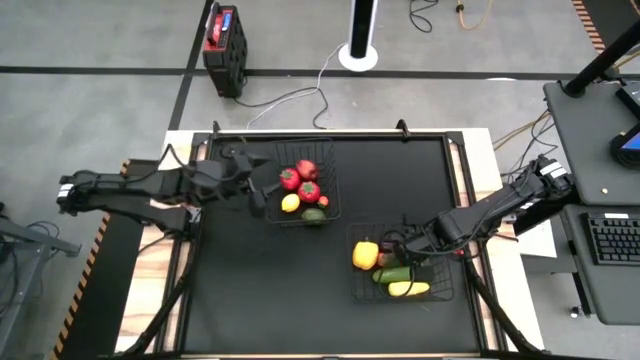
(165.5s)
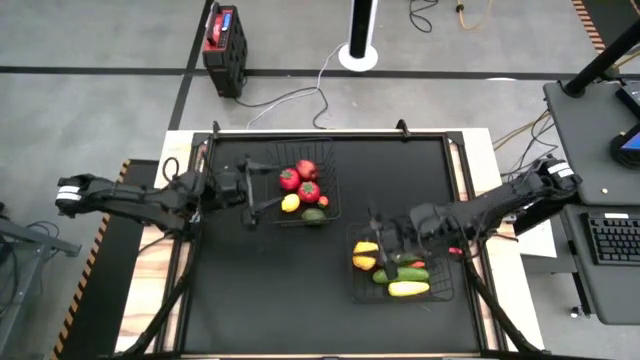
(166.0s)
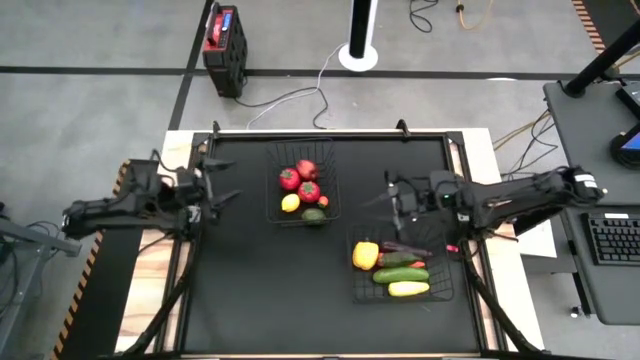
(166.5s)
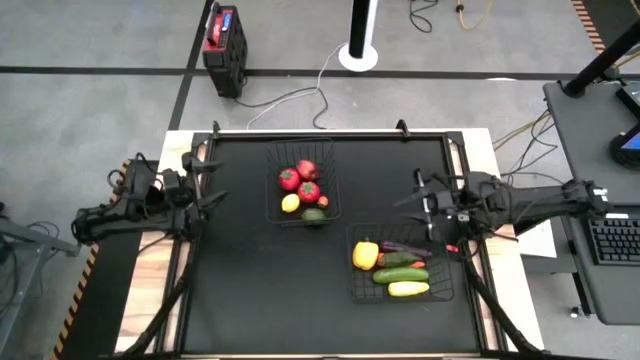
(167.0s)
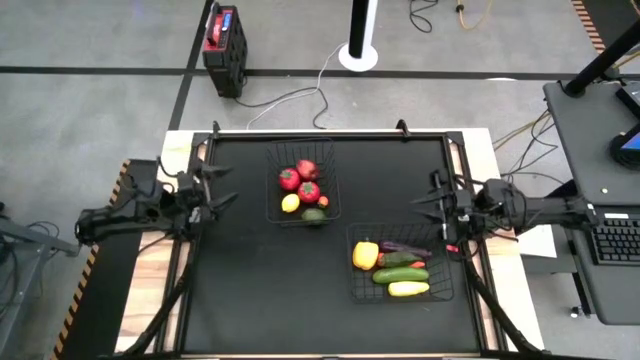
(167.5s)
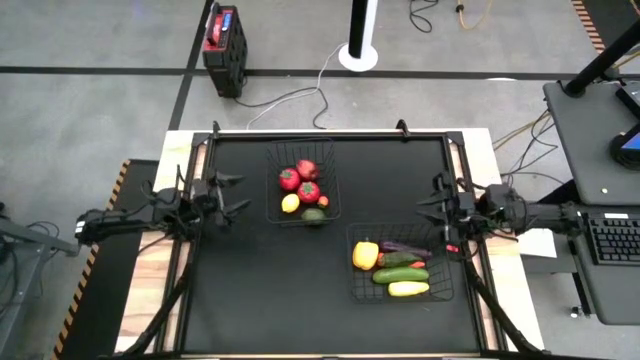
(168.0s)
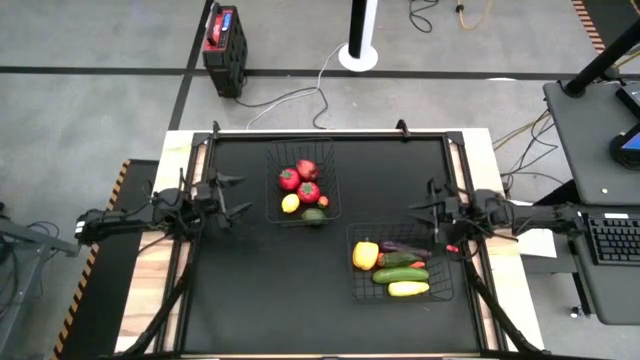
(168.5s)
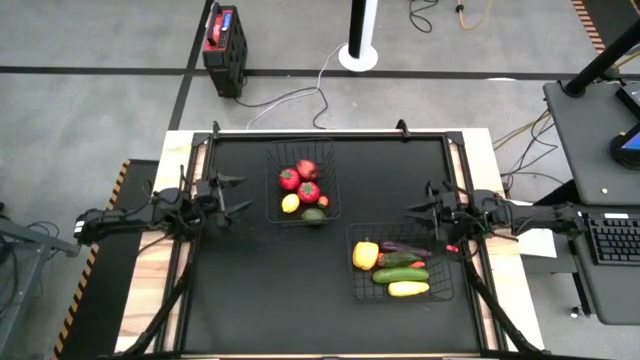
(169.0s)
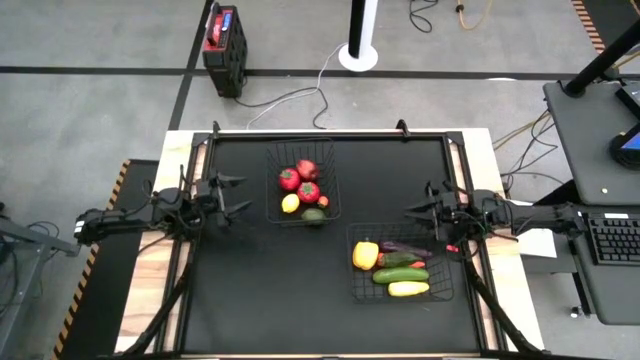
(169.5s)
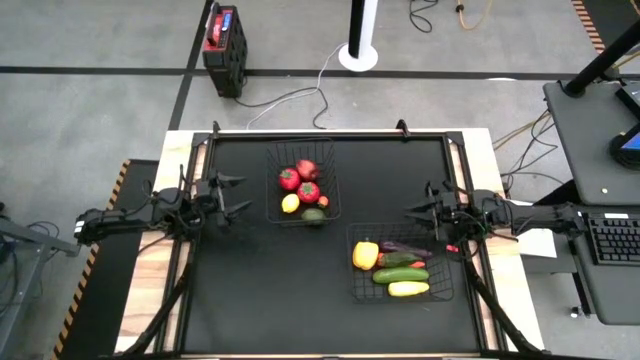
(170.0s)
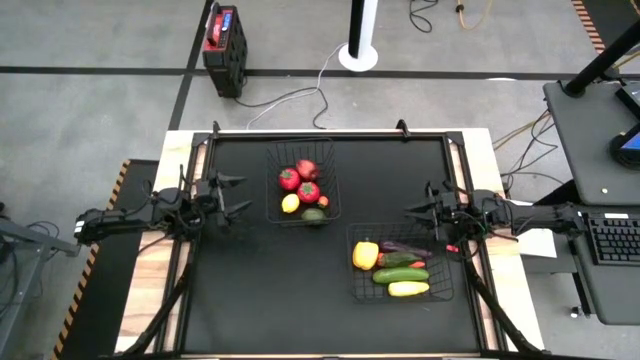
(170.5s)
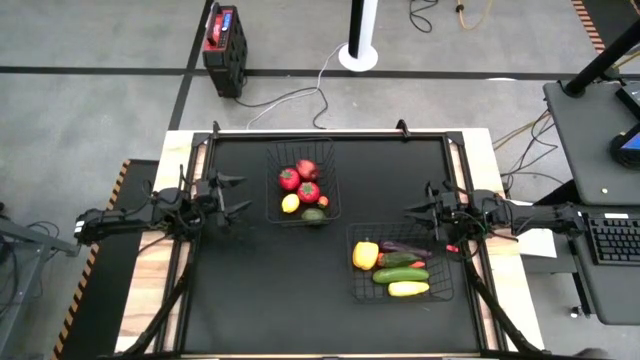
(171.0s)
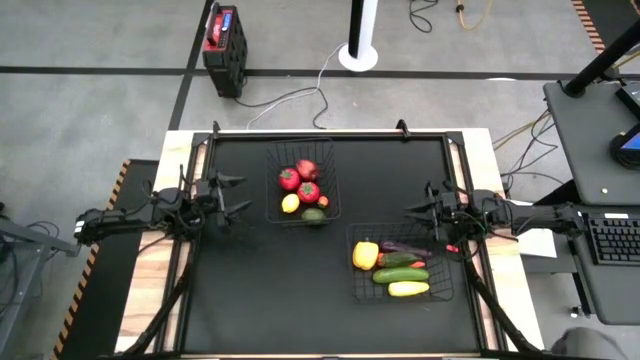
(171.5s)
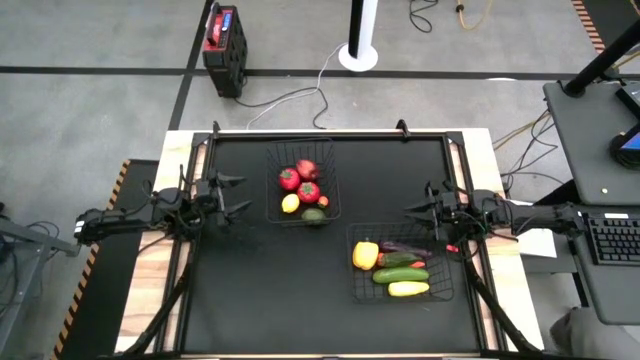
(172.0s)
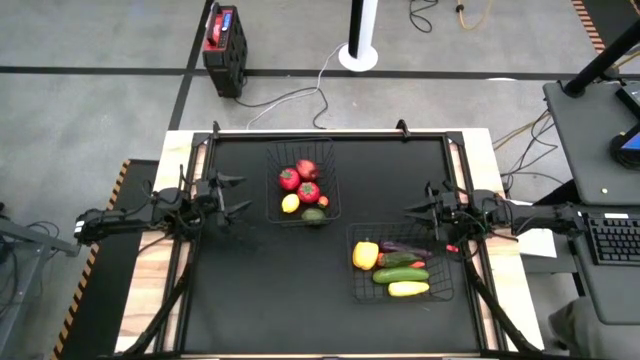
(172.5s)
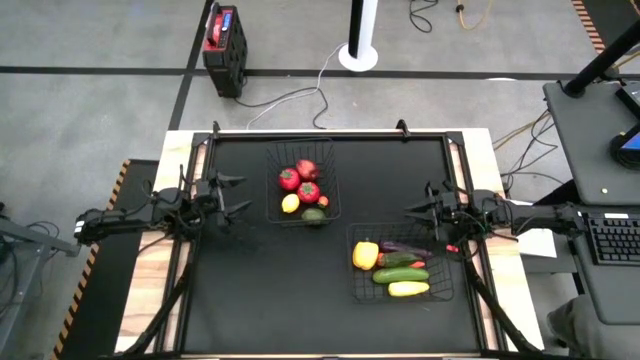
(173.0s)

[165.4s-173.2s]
Task: Sort produce into baskets
Return to Home Position

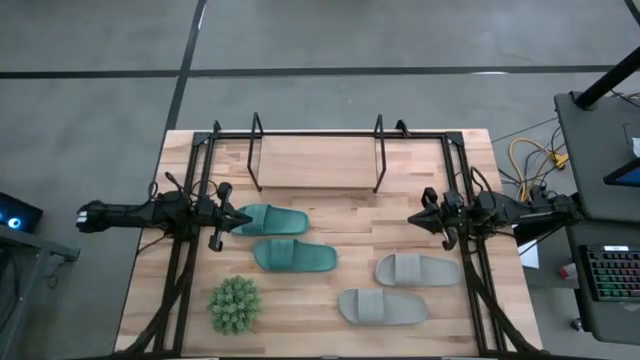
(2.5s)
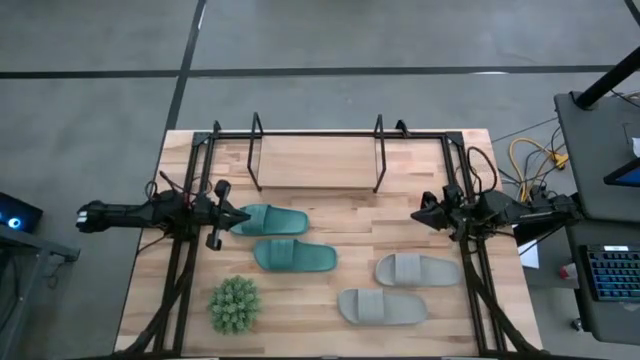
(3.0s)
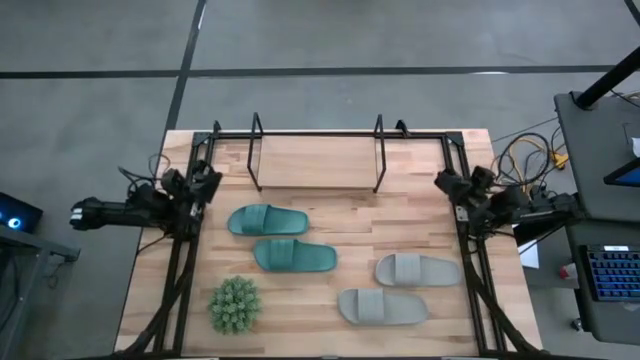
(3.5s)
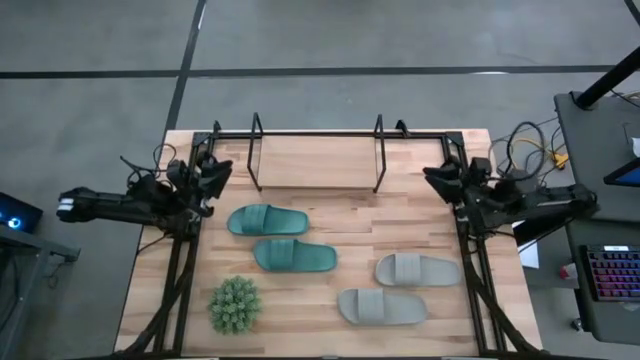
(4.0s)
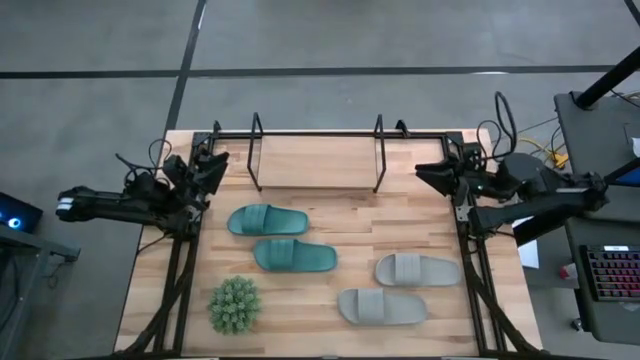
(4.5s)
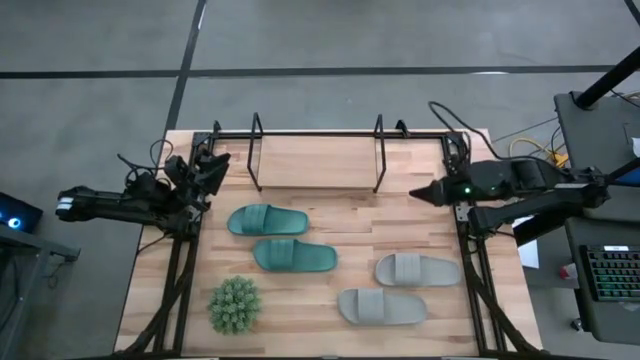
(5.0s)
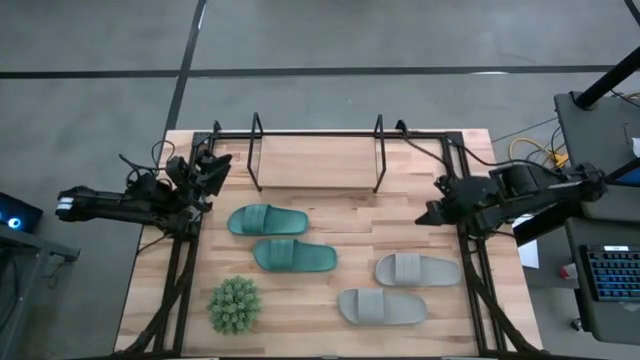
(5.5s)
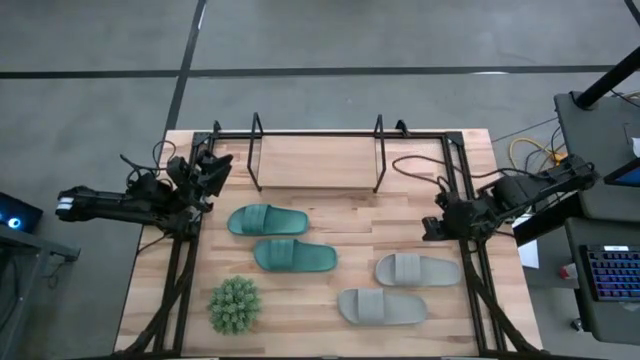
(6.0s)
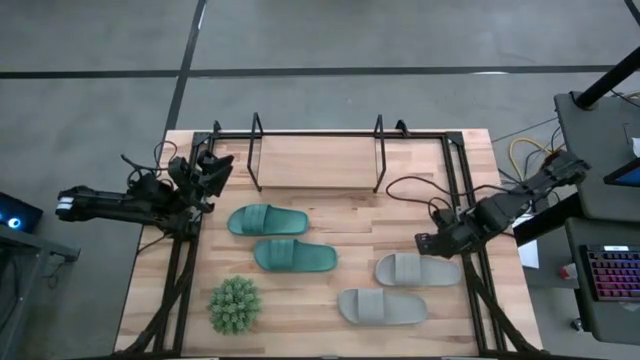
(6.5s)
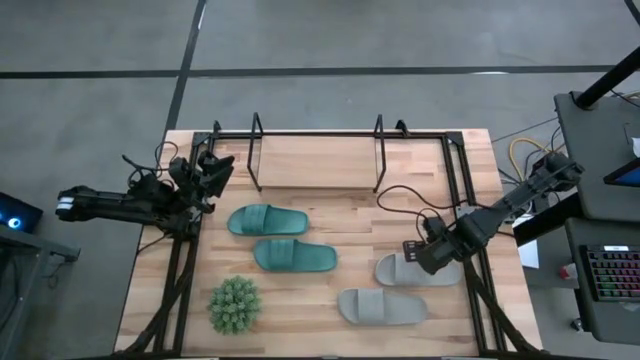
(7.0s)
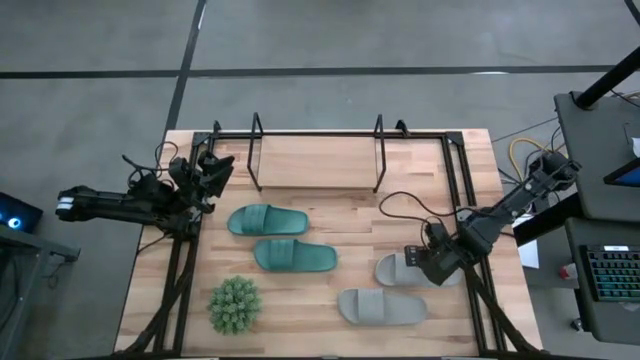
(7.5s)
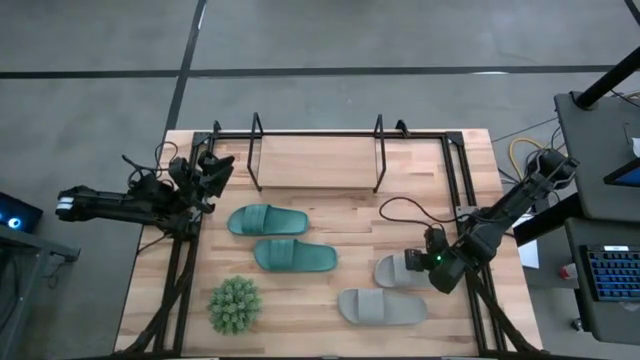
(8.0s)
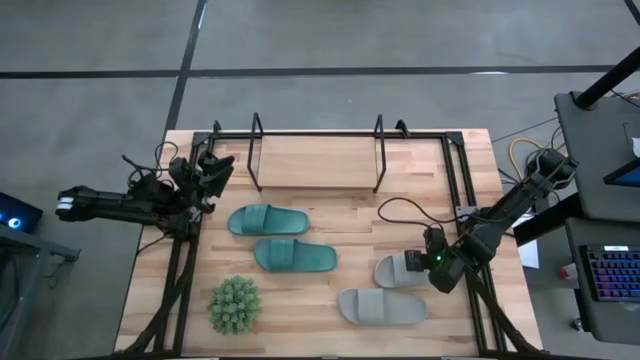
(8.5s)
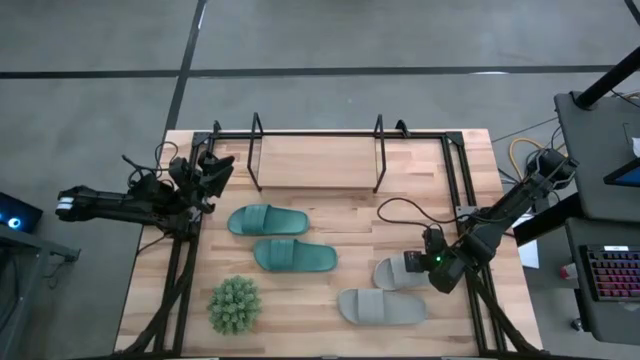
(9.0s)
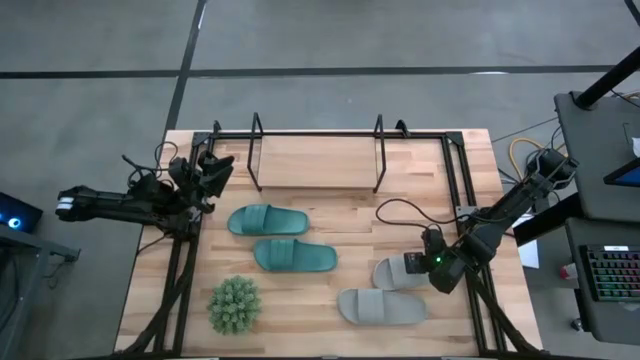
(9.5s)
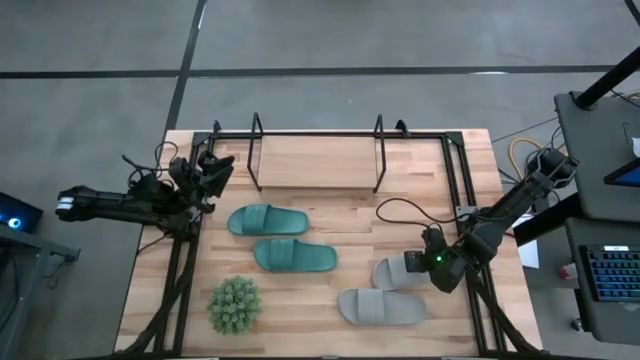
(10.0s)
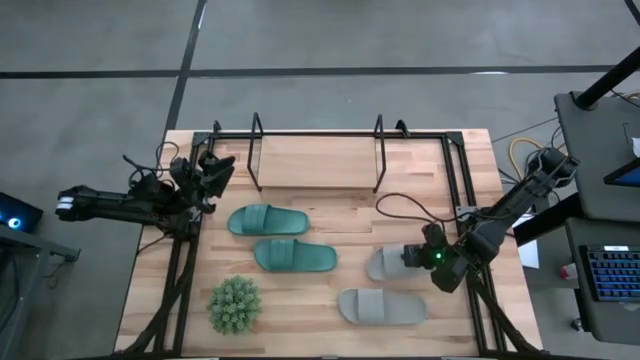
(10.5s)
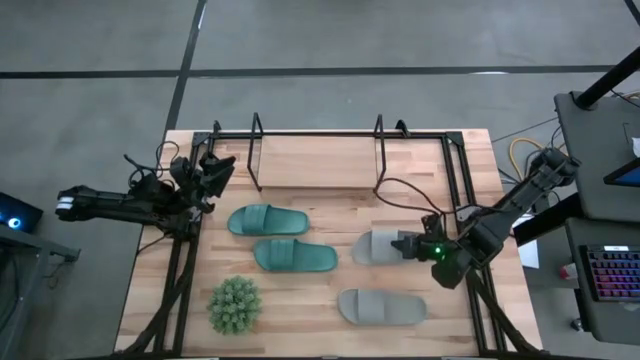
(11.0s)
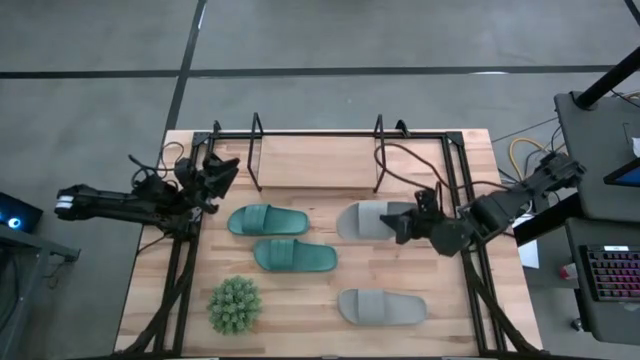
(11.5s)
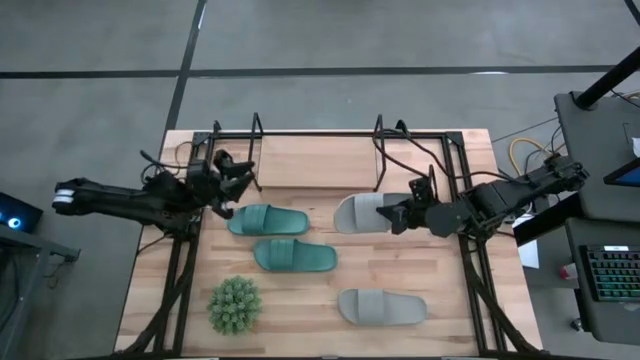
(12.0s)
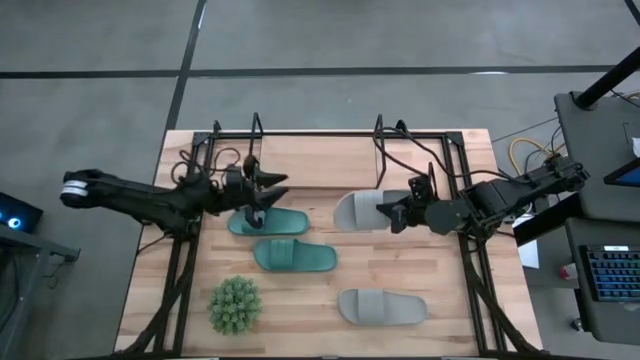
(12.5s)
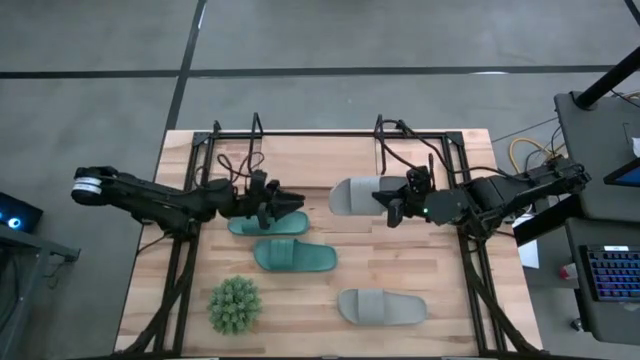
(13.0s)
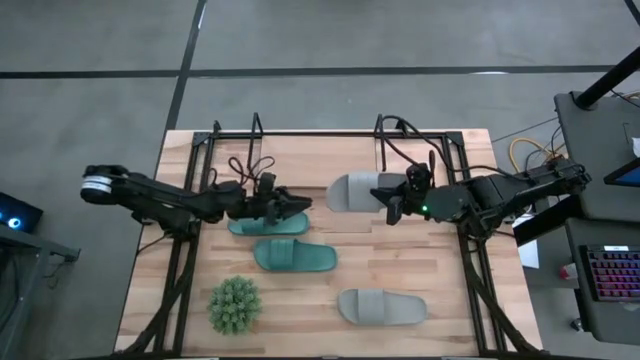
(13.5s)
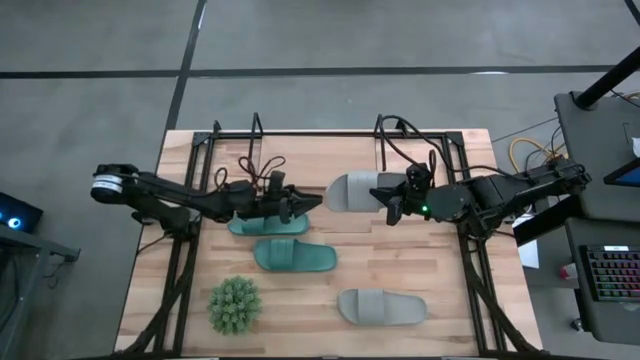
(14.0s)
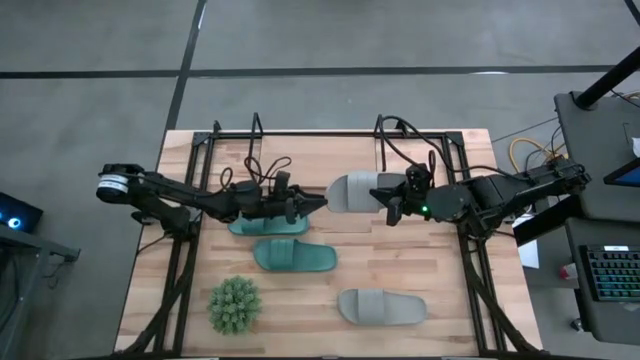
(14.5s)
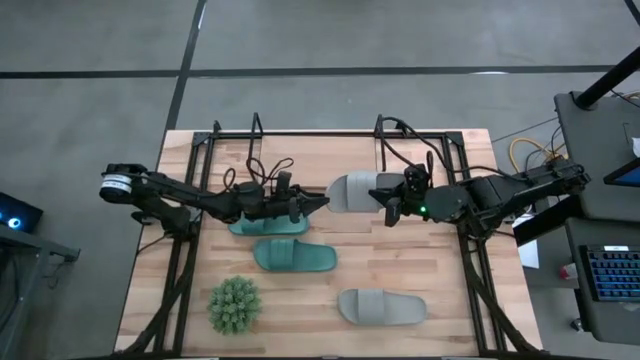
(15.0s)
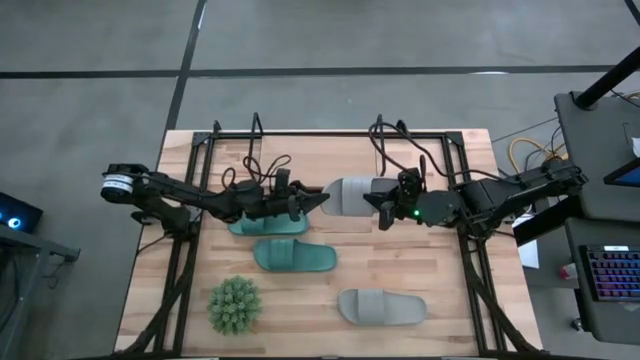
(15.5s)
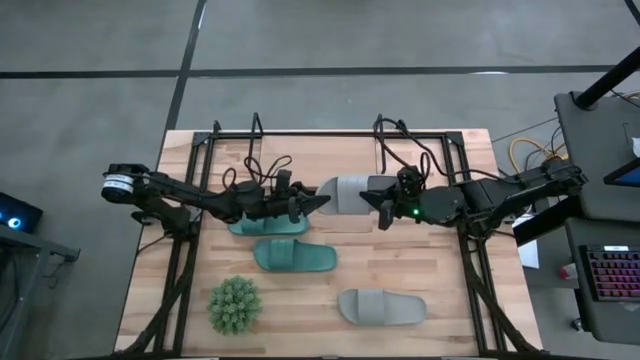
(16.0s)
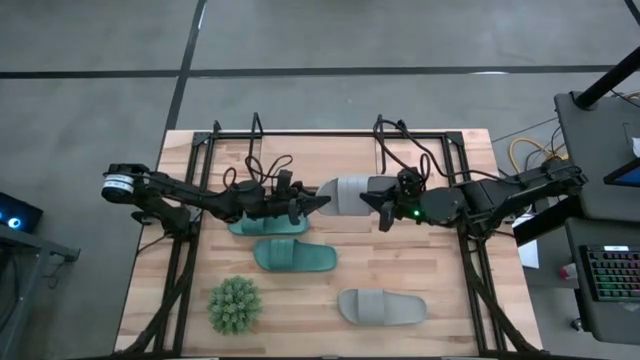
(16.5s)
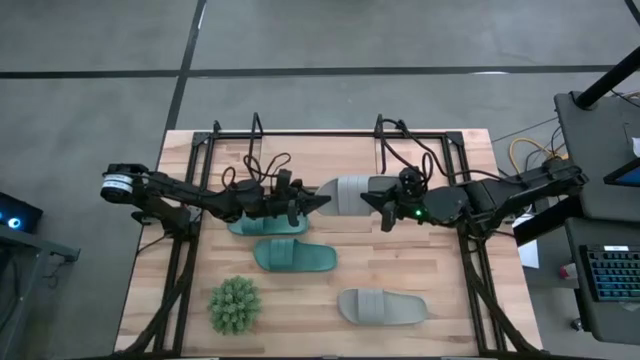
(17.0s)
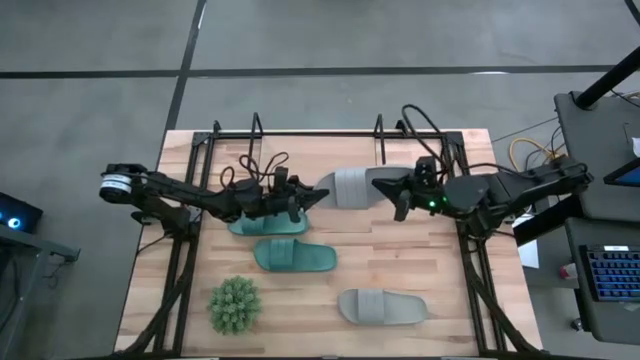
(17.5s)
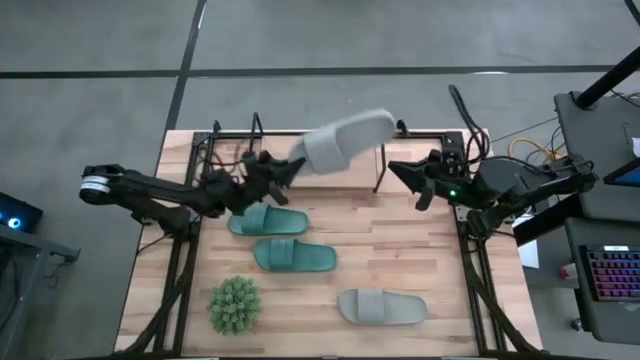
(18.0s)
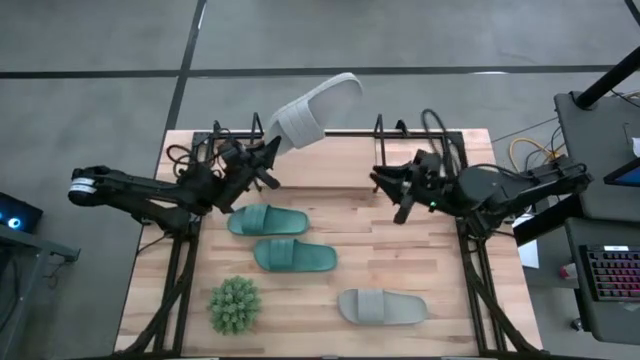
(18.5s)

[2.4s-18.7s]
Task: Pick and place slides into the shelf
Put the top gray slipper on the shelf
